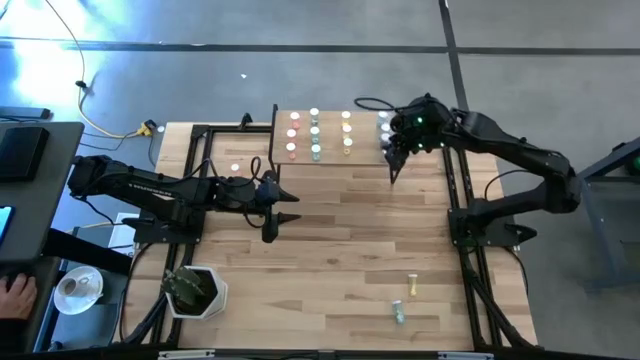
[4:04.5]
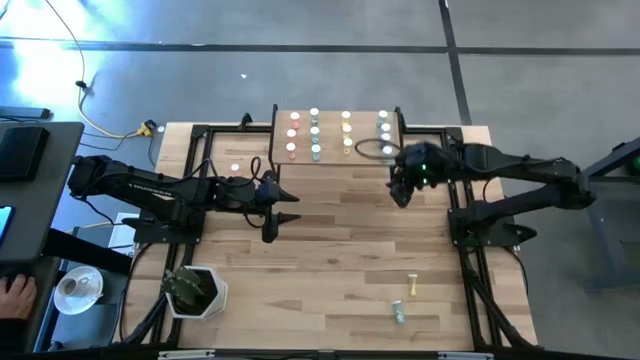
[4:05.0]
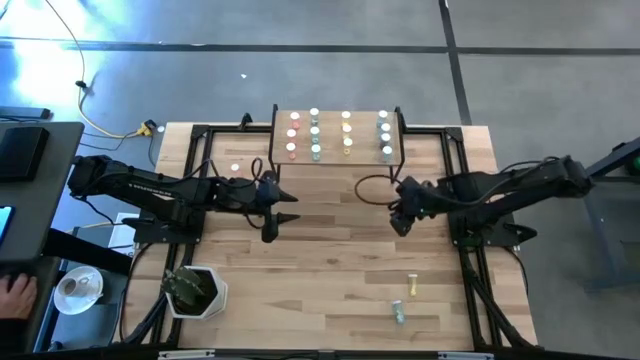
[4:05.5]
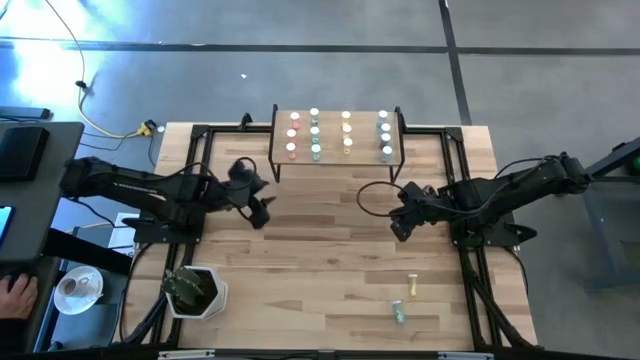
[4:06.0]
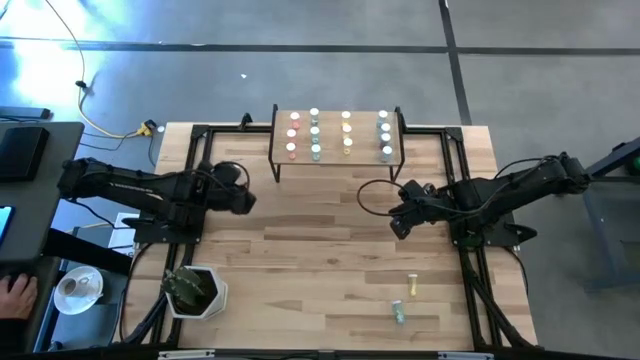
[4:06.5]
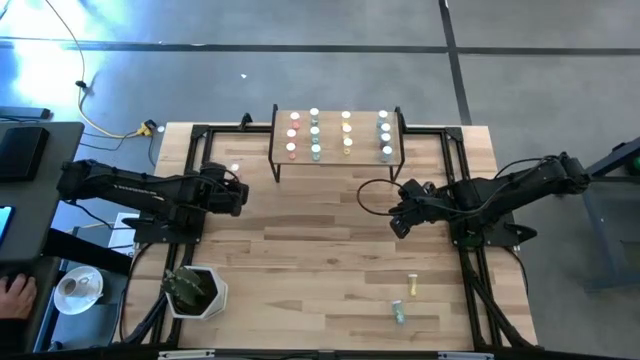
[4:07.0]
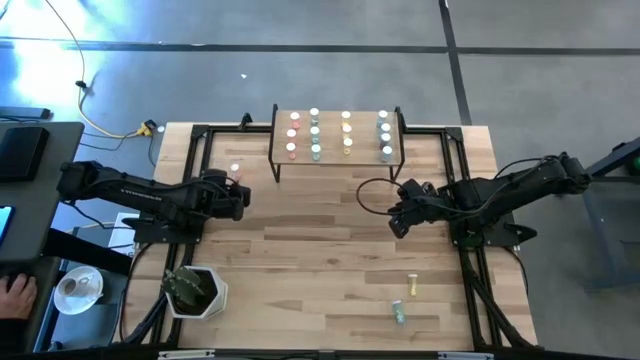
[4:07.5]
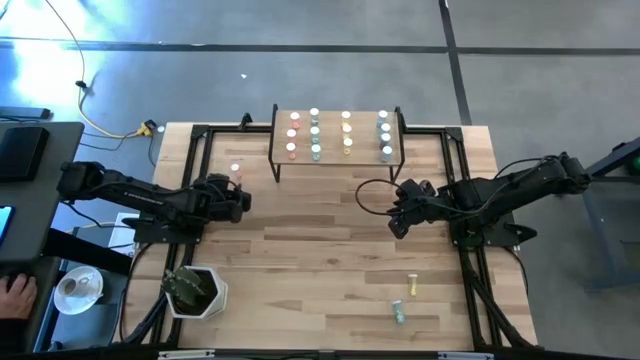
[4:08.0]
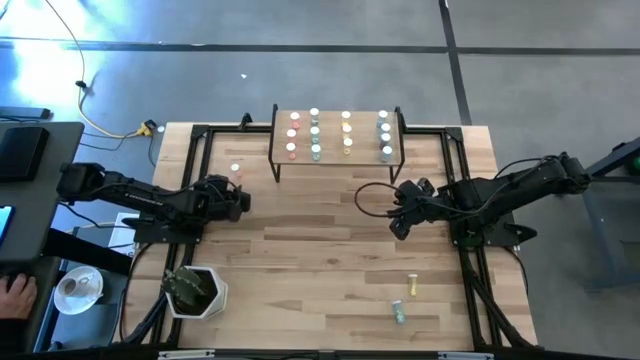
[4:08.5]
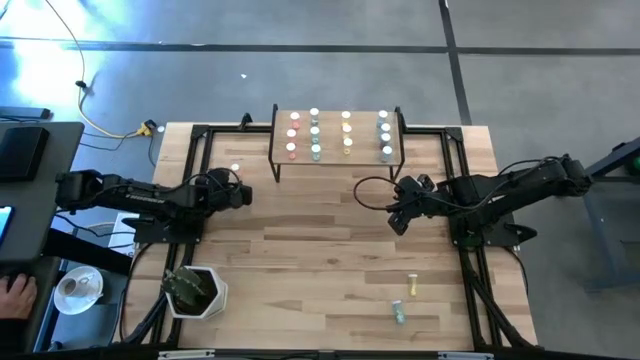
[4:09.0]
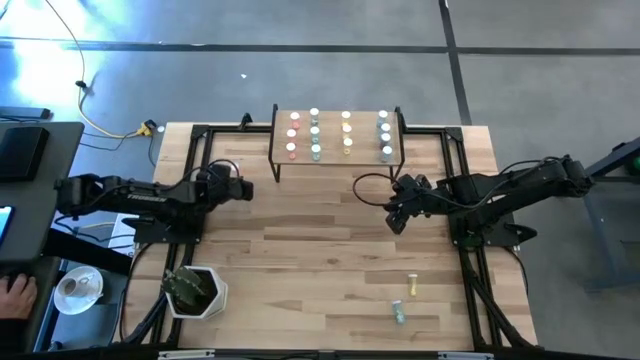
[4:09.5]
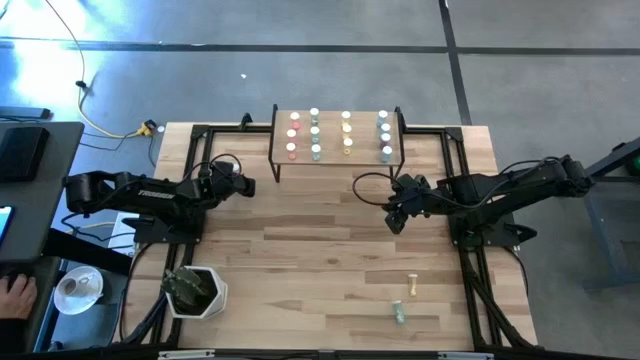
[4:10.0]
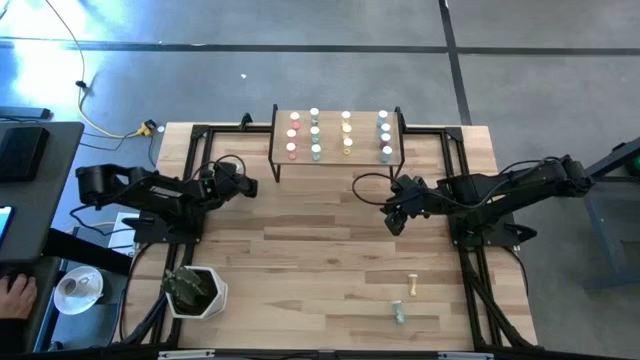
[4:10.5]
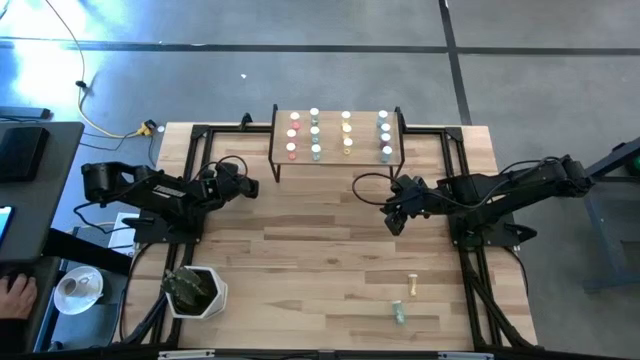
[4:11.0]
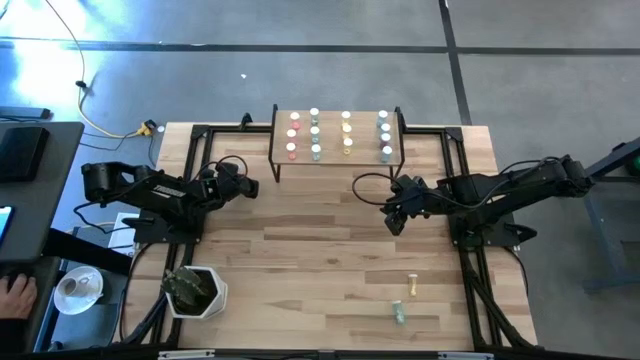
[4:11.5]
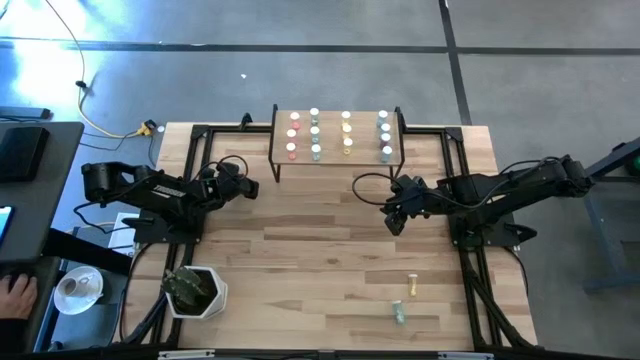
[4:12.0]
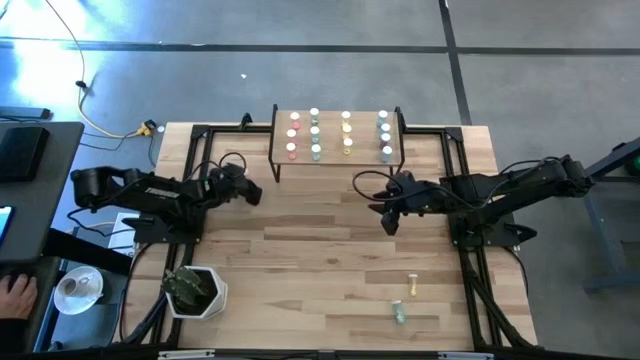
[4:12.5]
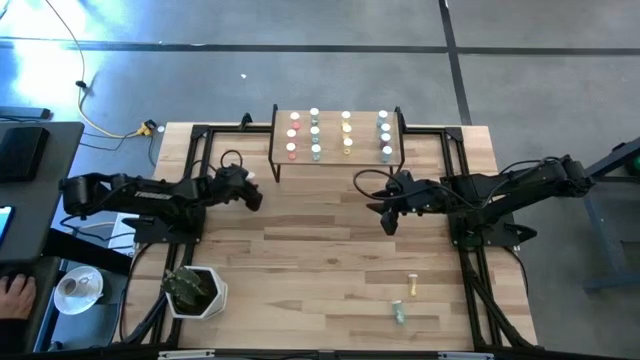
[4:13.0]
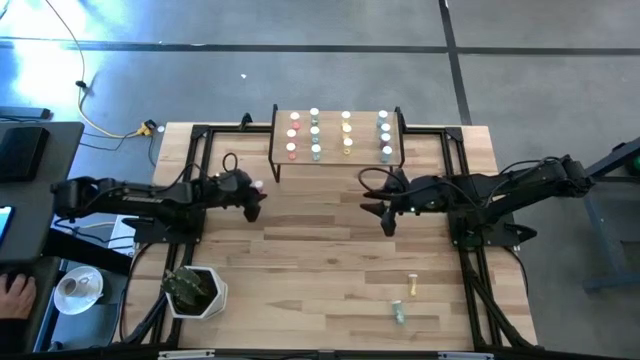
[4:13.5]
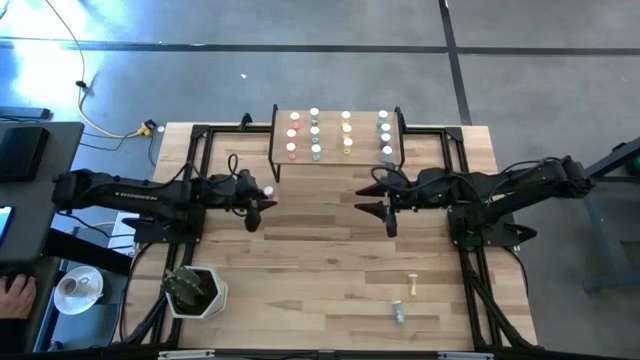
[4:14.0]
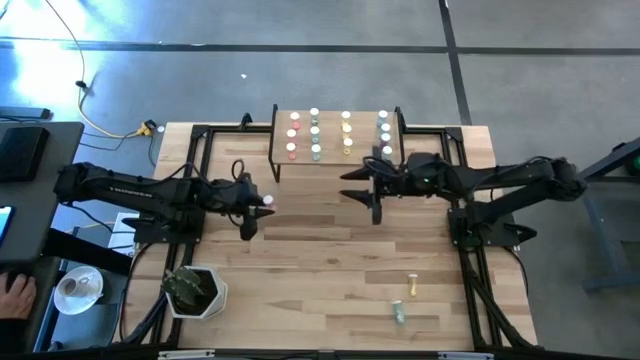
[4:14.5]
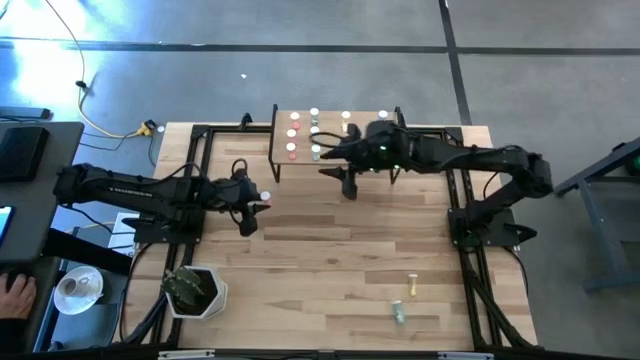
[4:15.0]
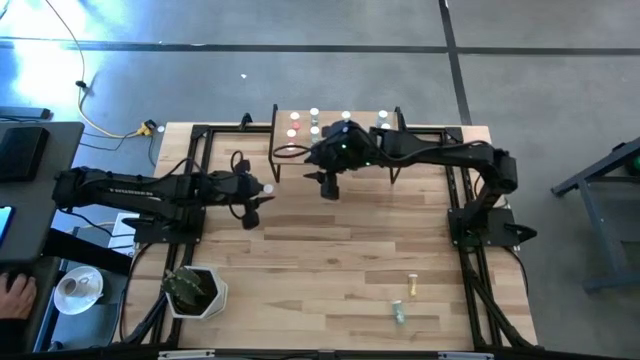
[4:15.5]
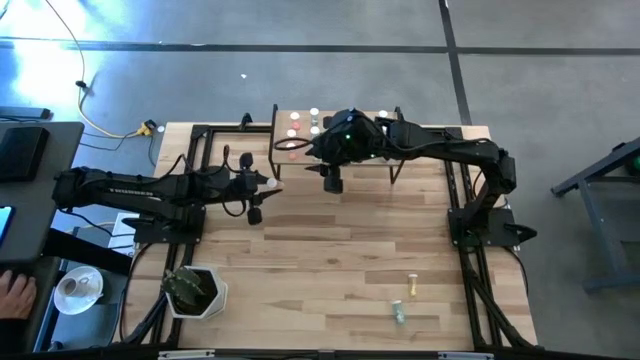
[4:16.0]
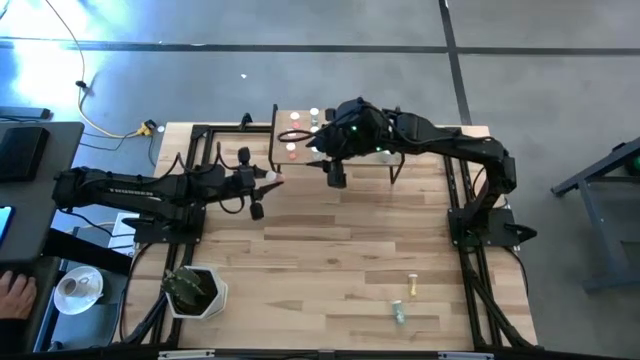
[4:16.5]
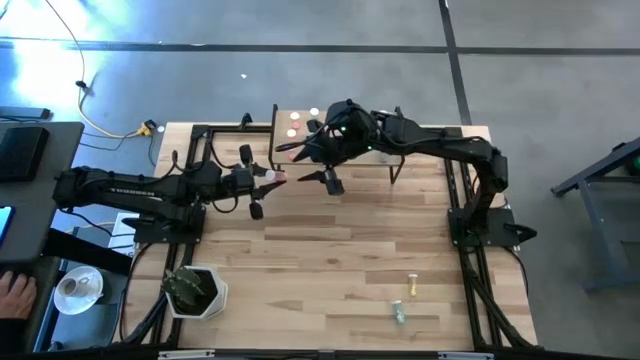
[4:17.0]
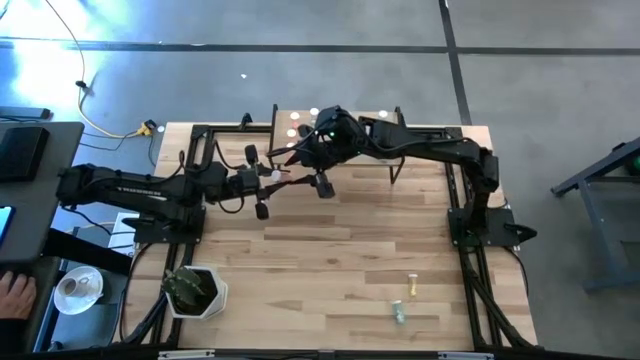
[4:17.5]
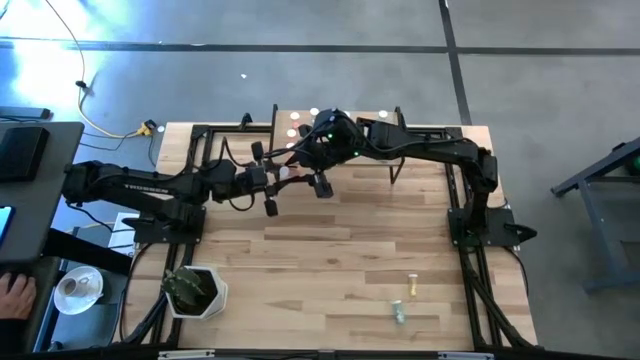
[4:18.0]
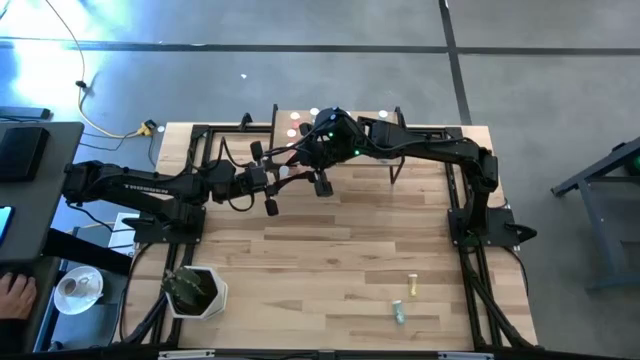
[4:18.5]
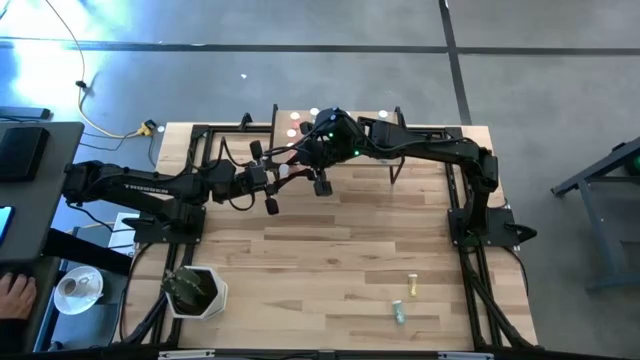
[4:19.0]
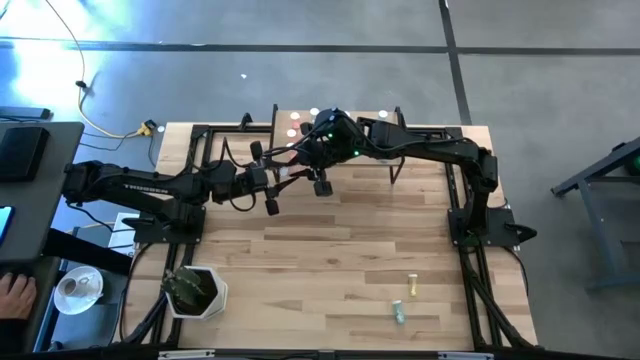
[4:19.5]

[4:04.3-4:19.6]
Task: Pick and place medicine bottles onto shelf by color
Put the pink medicine bottle on the shelf

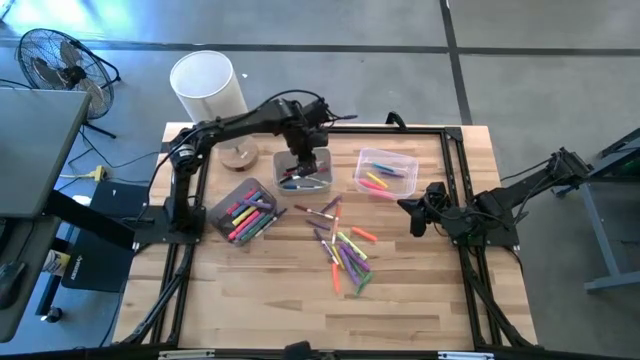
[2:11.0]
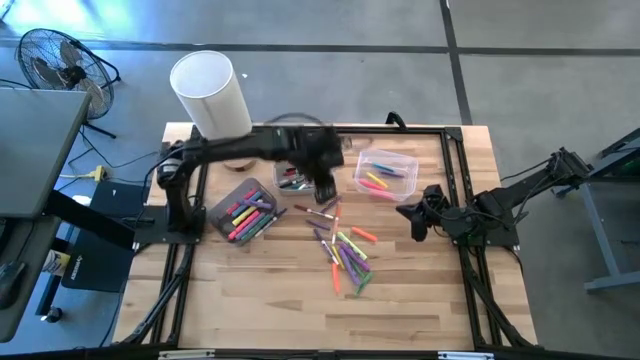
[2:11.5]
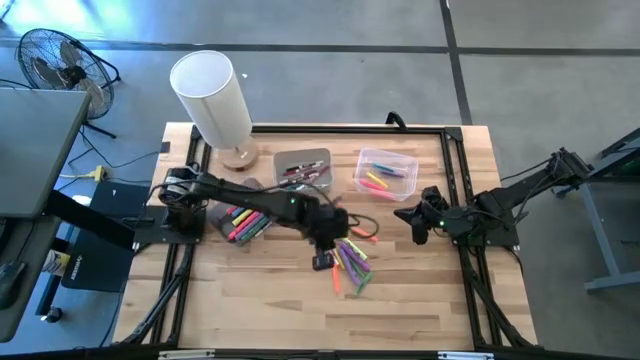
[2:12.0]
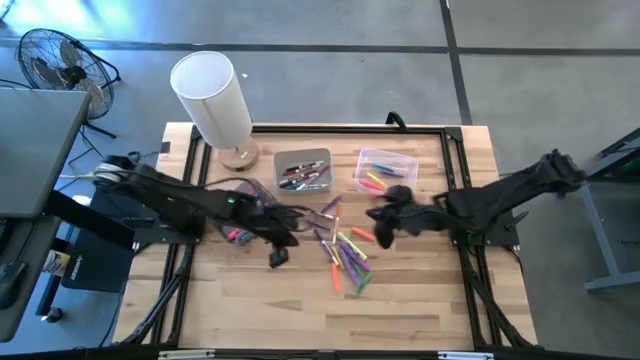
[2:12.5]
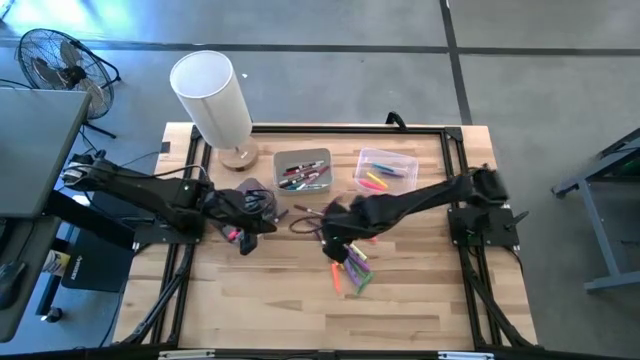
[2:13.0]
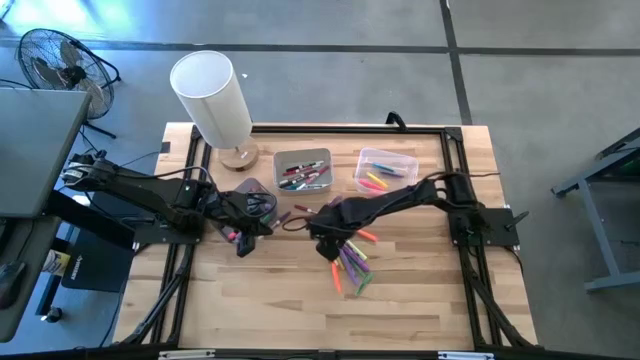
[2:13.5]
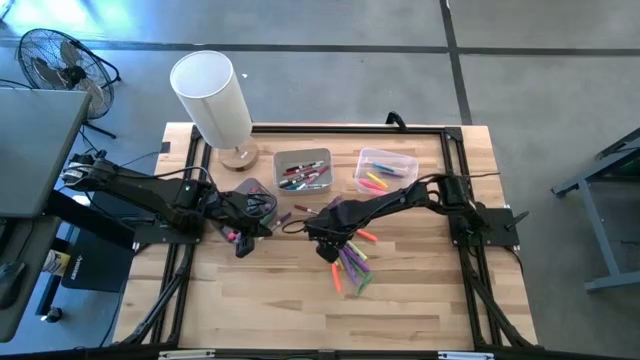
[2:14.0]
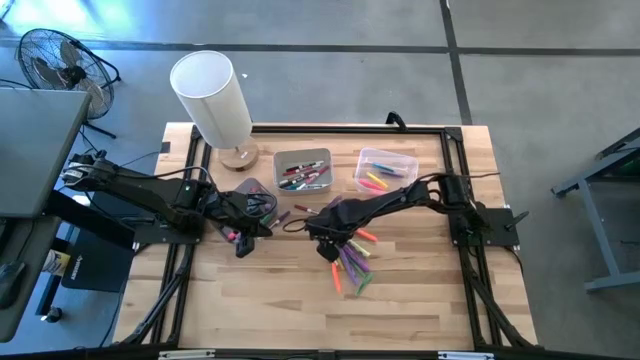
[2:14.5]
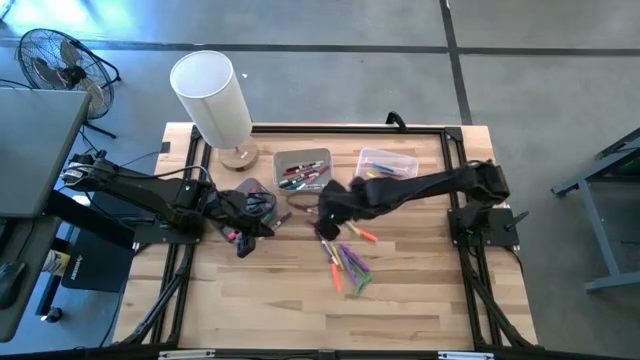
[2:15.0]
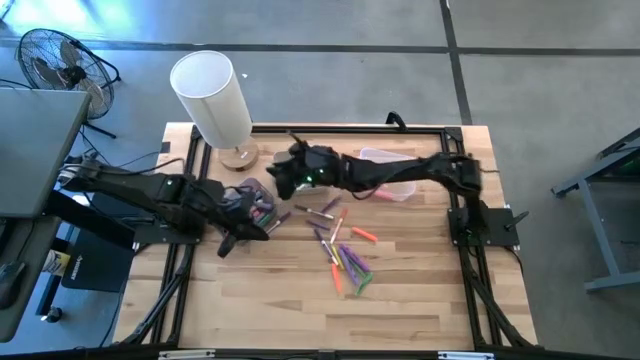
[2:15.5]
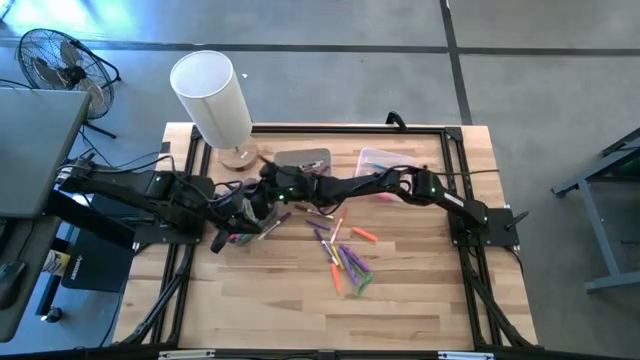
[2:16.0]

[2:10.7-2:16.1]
Task: Pick & Place Markers
Put the light green highlighter pen into the black bin
